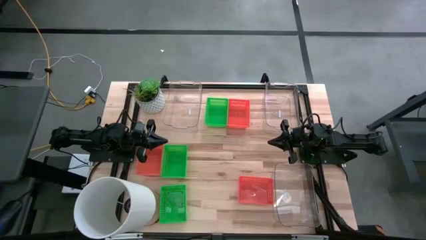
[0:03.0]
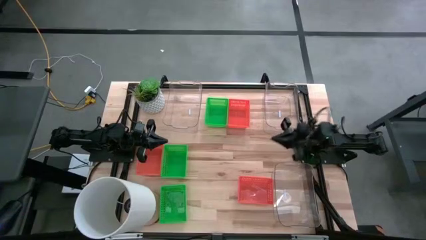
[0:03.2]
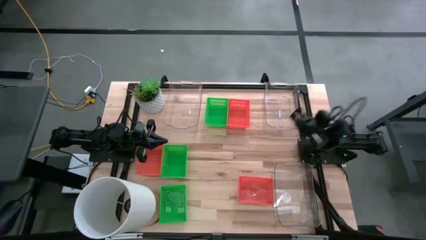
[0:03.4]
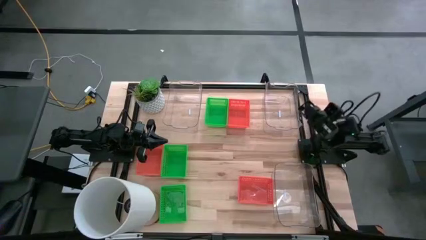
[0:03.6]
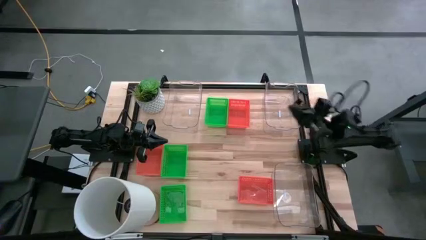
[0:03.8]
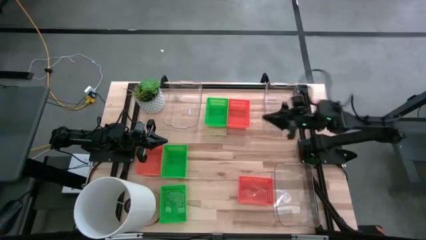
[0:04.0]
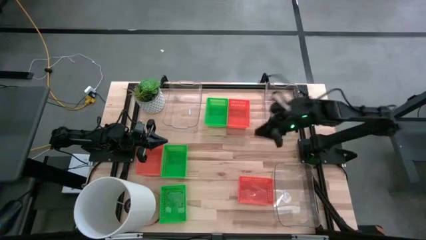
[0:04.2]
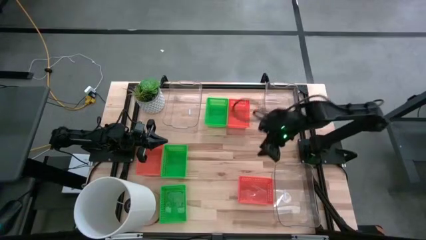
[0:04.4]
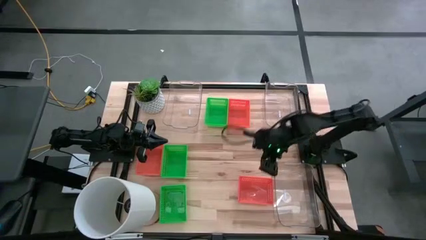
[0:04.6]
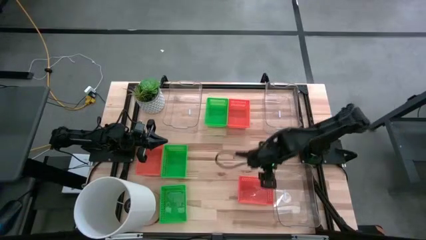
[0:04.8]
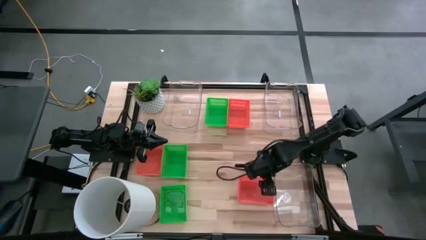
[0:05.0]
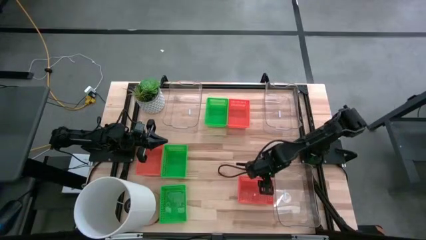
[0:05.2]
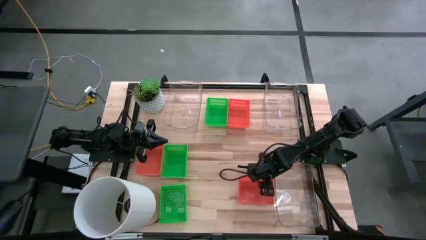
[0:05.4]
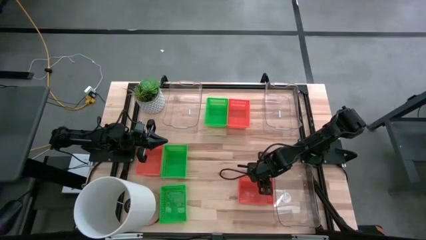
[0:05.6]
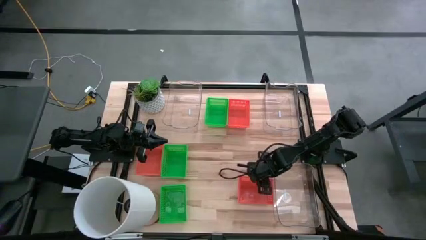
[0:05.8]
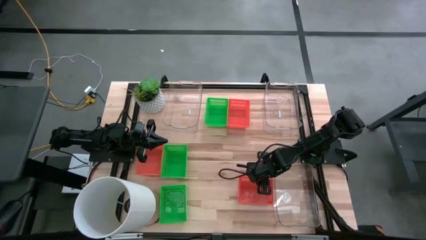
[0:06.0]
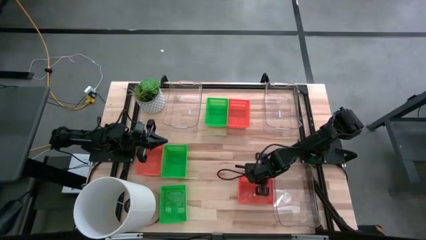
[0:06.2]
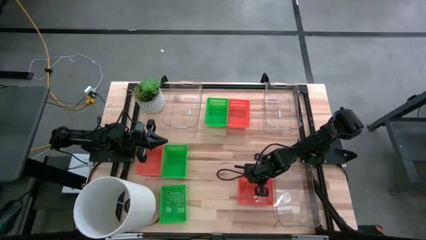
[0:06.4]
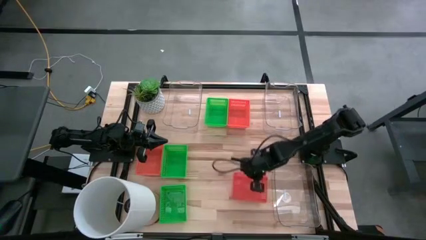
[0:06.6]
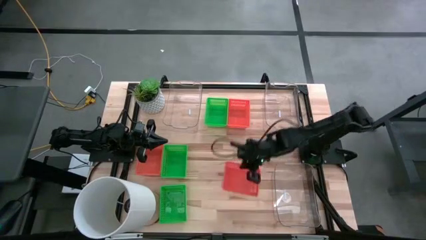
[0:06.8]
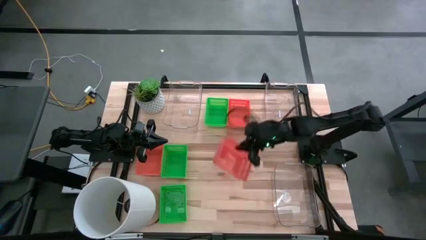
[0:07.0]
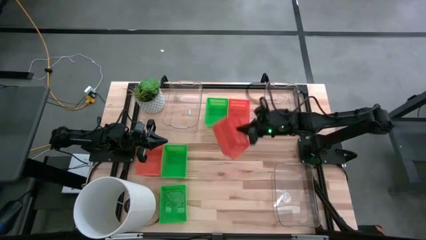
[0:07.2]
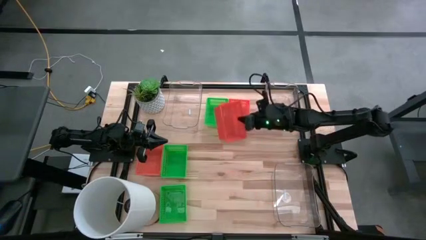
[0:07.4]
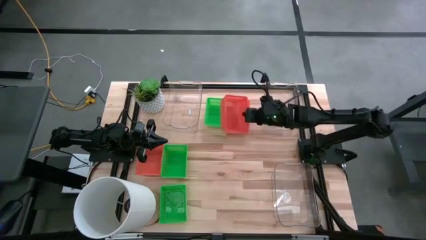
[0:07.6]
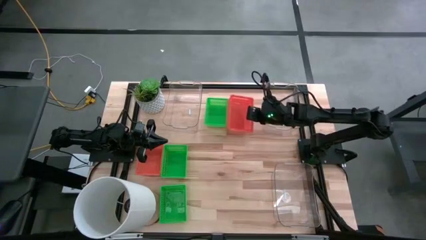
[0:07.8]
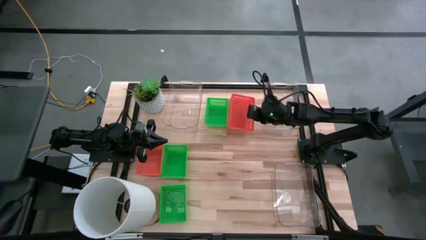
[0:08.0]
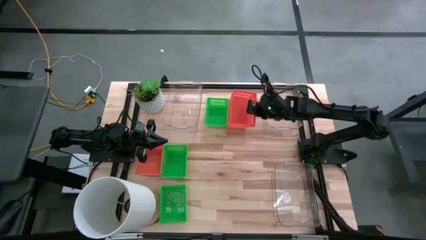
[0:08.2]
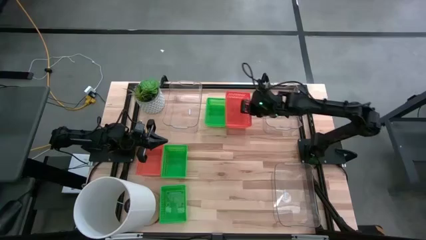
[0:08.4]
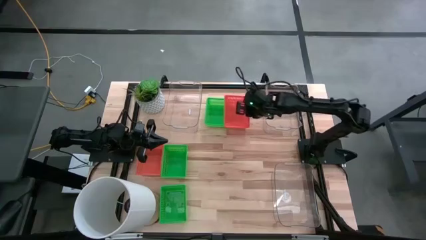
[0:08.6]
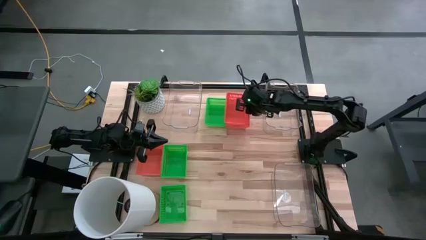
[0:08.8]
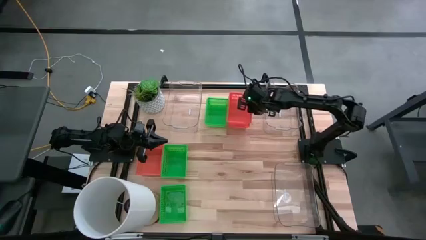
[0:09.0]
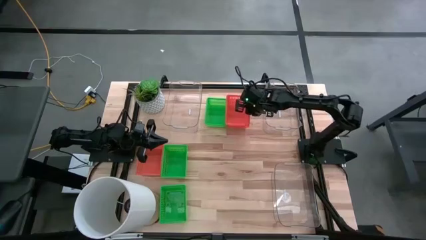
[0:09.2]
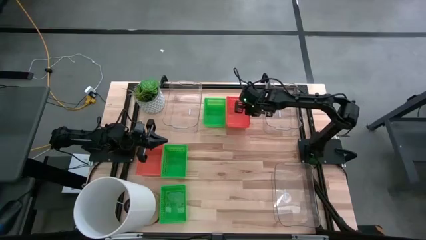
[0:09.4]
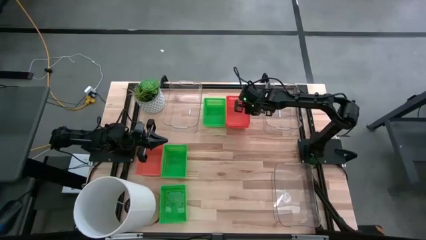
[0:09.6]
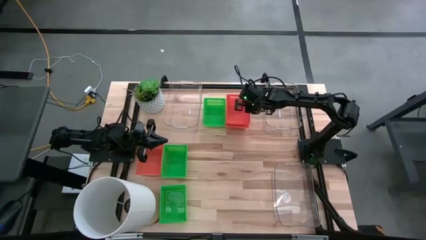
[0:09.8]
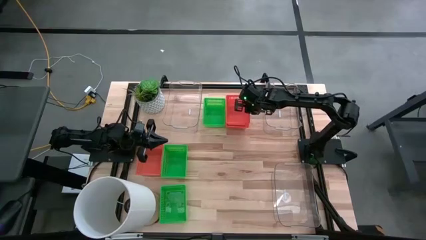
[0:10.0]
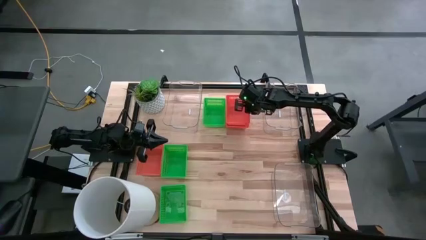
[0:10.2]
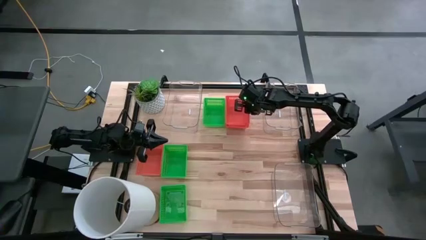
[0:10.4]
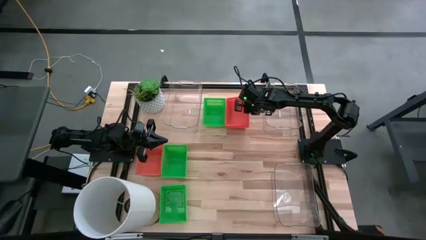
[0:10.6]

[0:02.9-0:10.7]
Stack the bottom orange bin on the top orange bin
